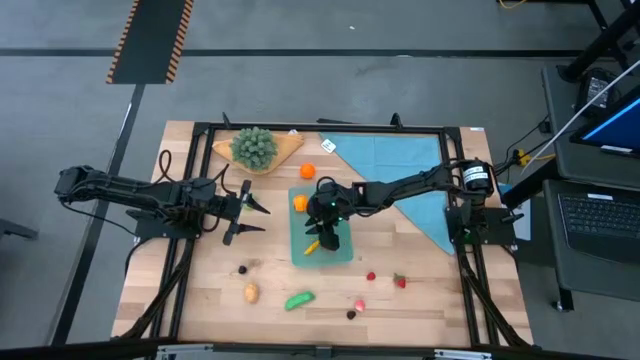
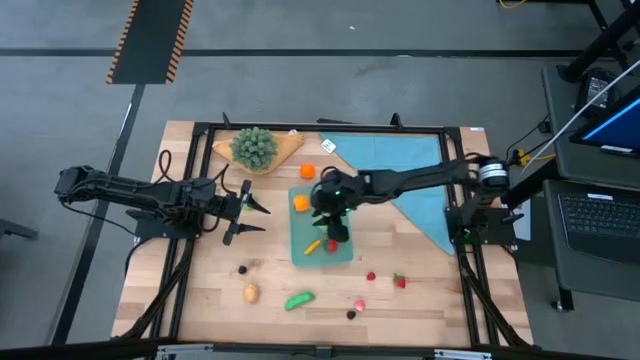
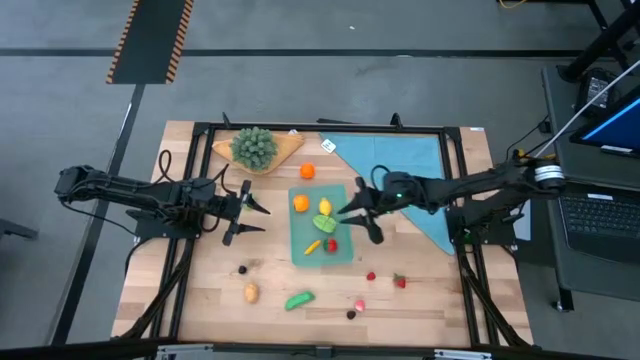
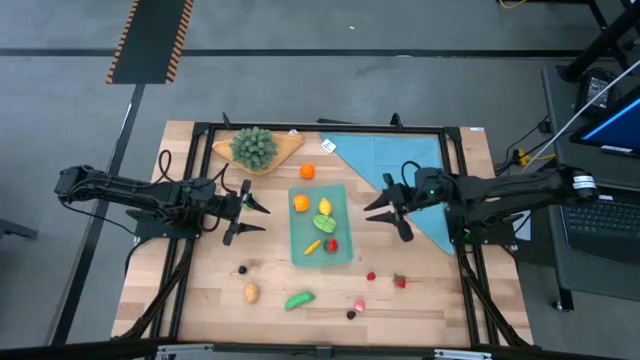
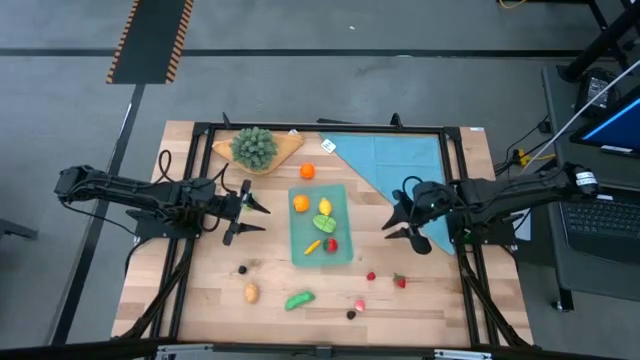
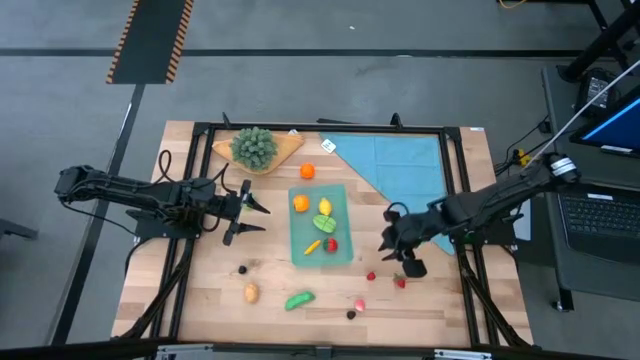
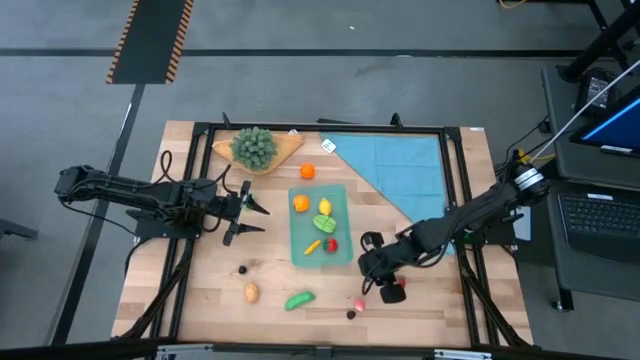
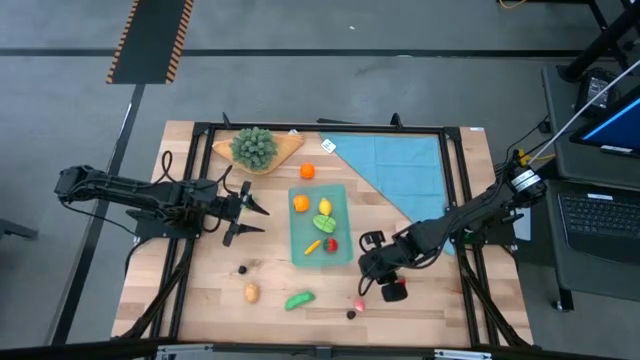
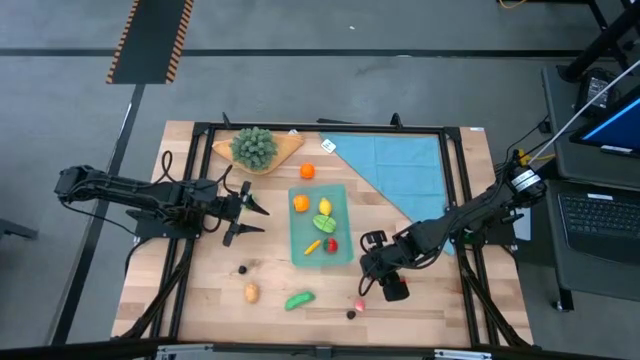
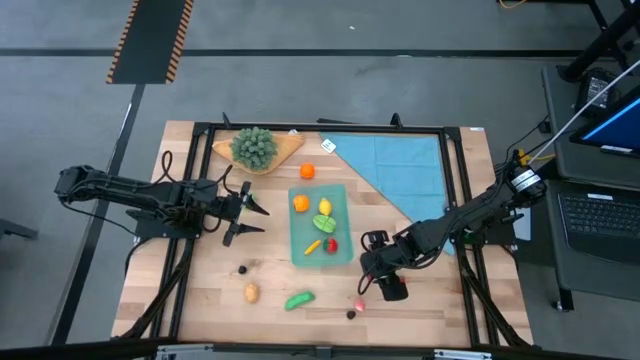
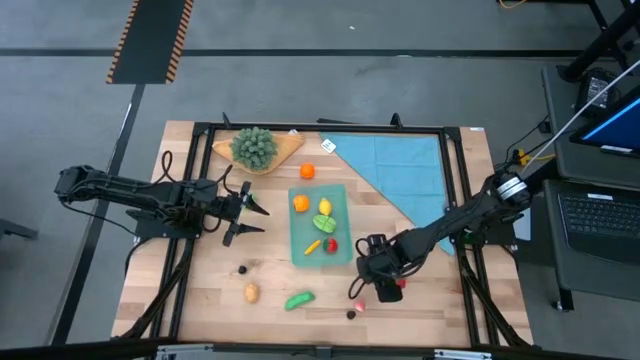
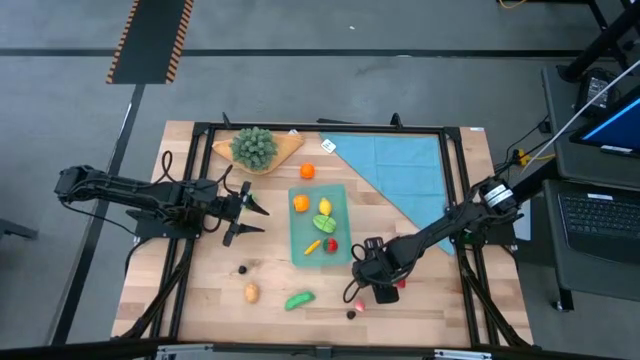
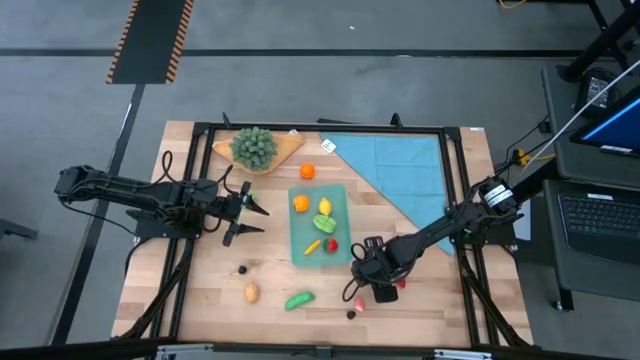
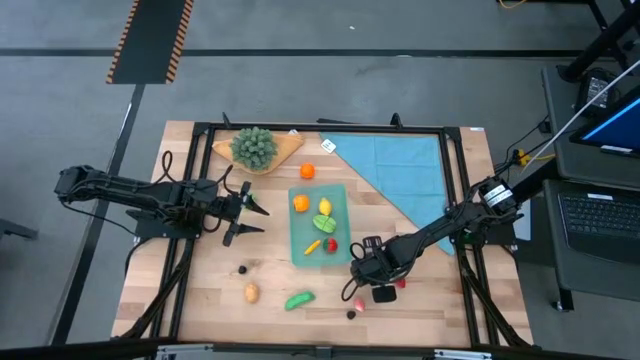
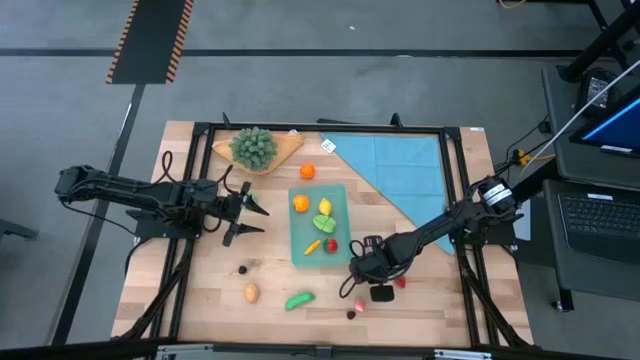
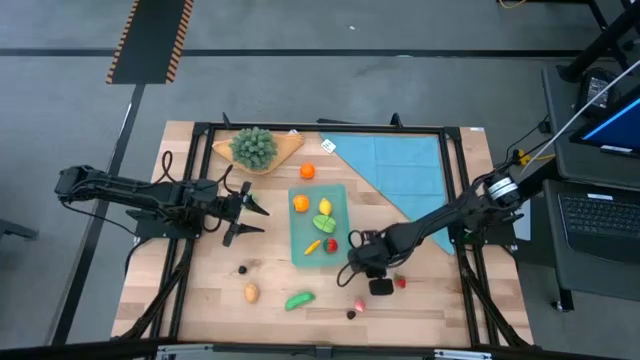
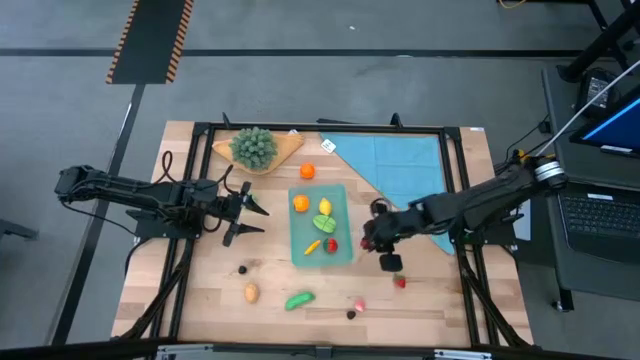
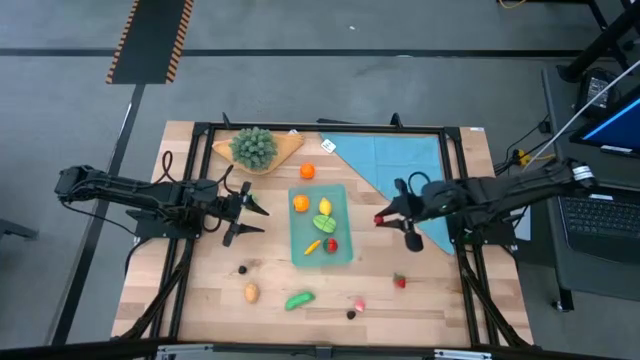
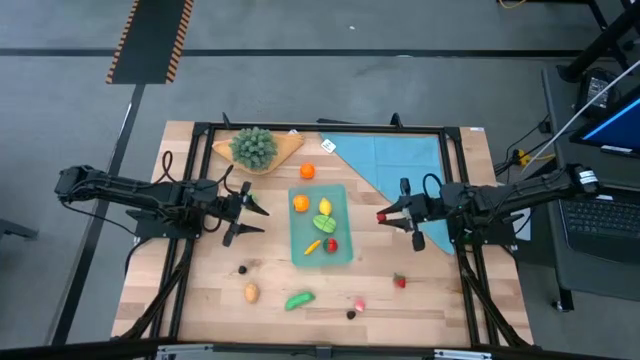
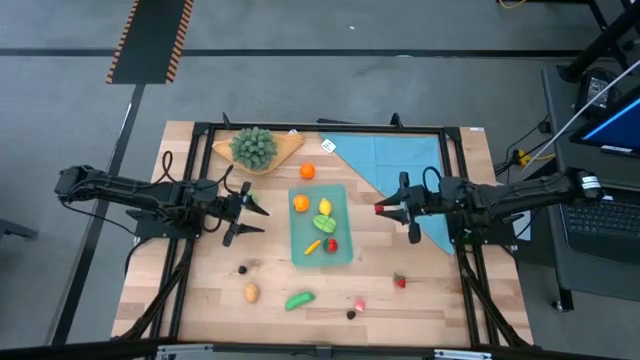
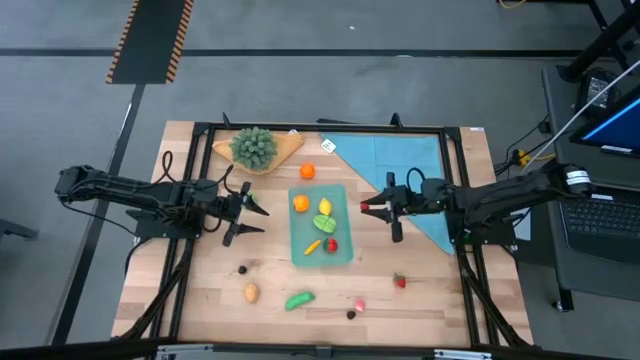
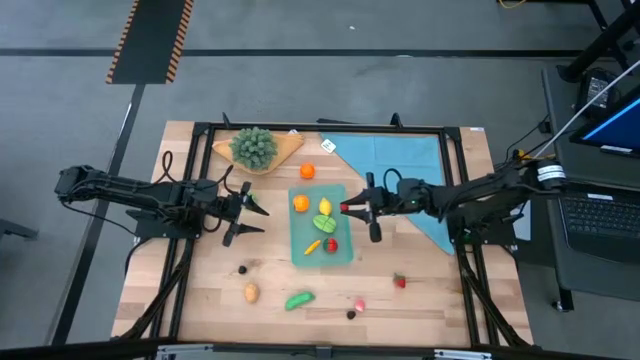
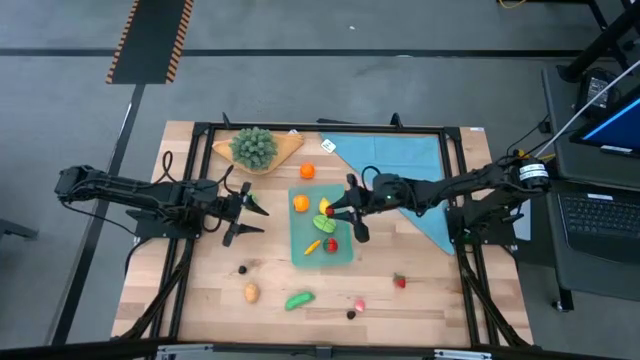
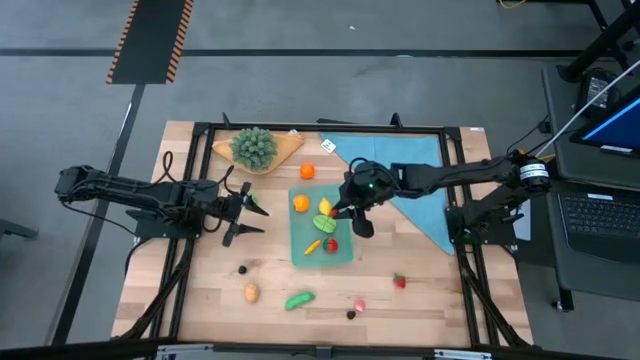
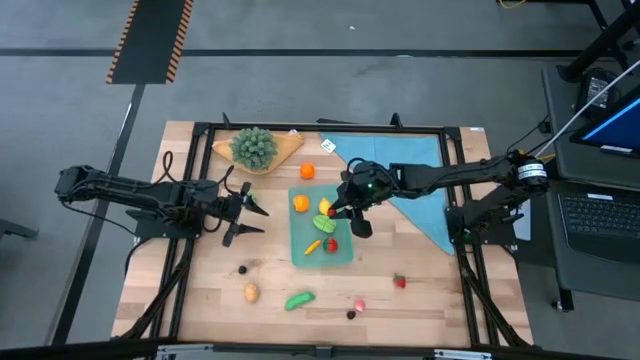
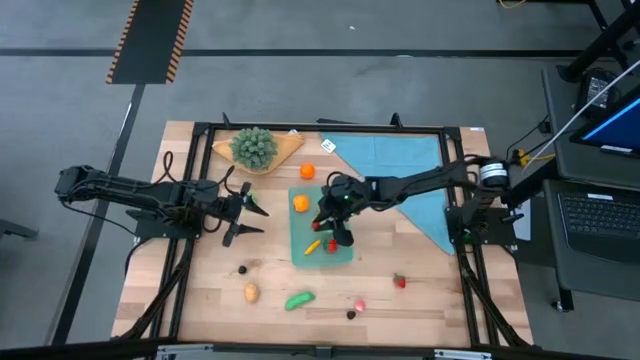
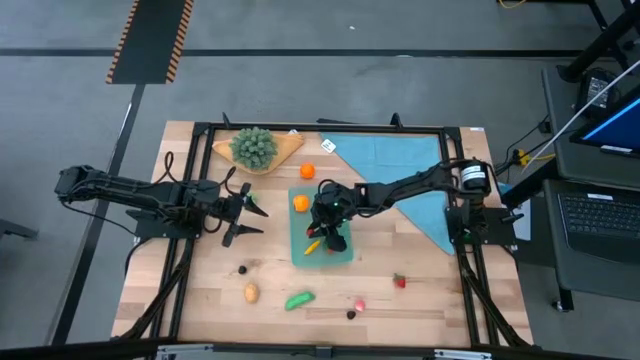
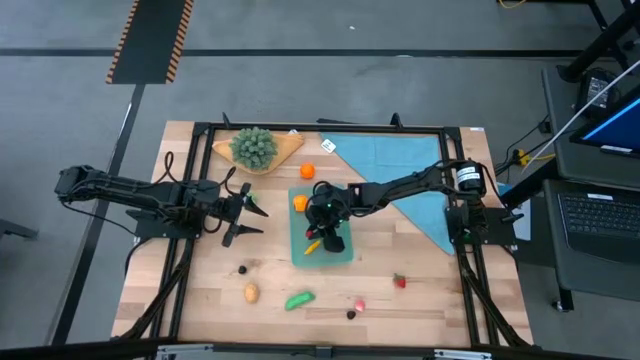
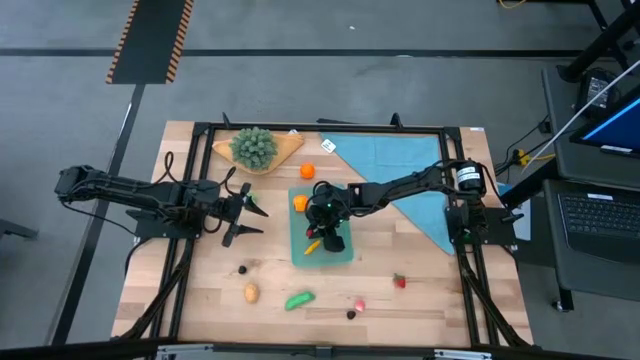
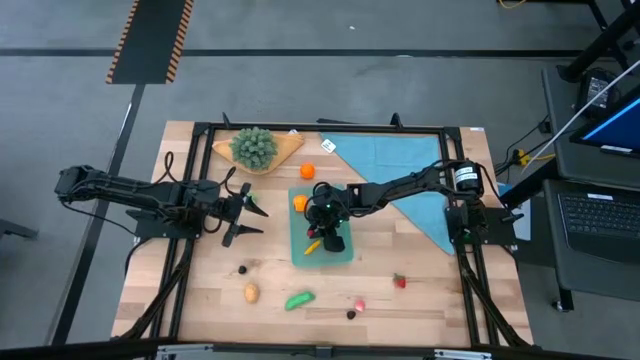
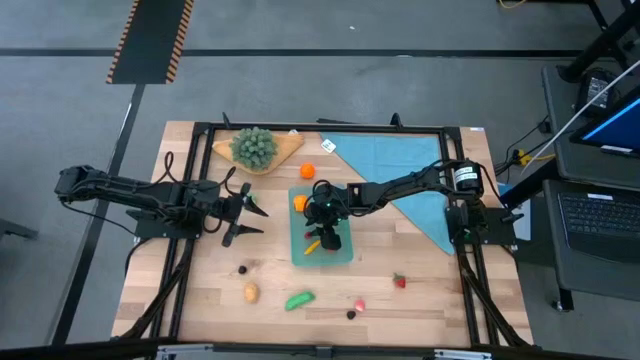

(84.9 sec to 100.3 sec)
Task: Pick and placing Produce into tupperware
Put the raspberry into the bin

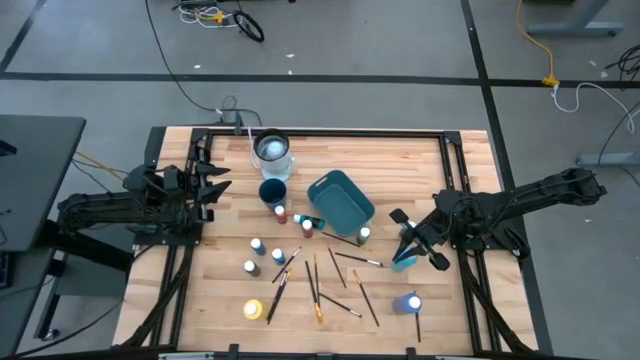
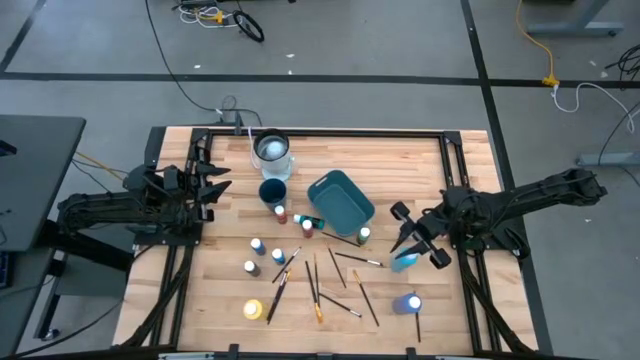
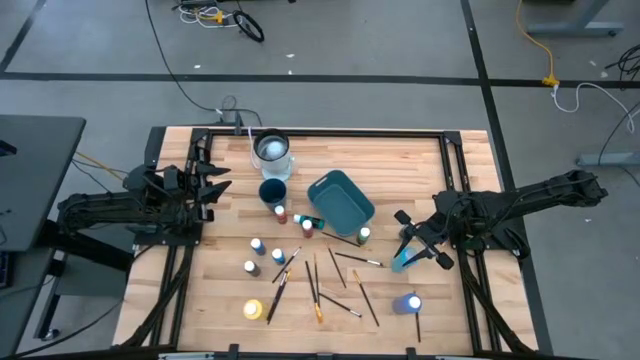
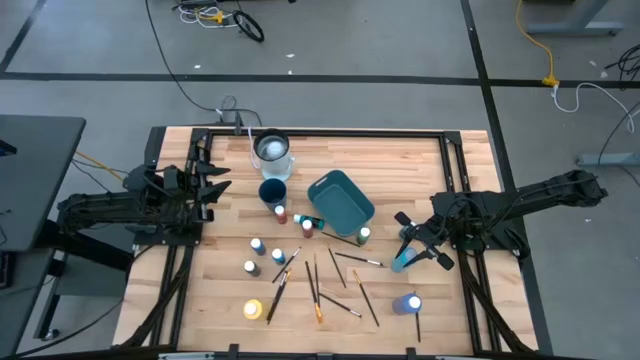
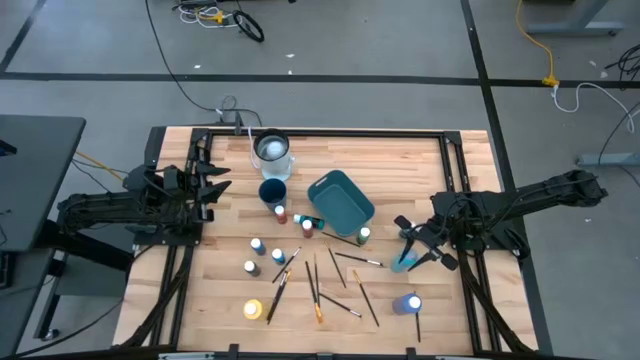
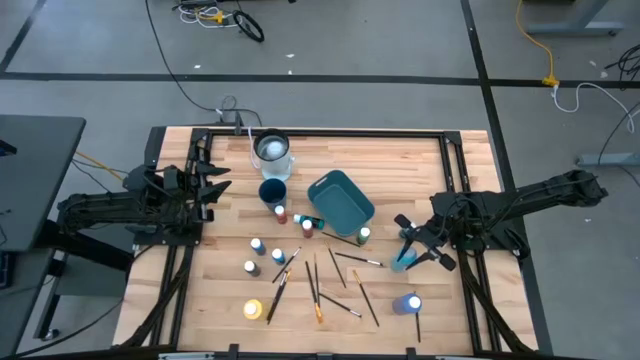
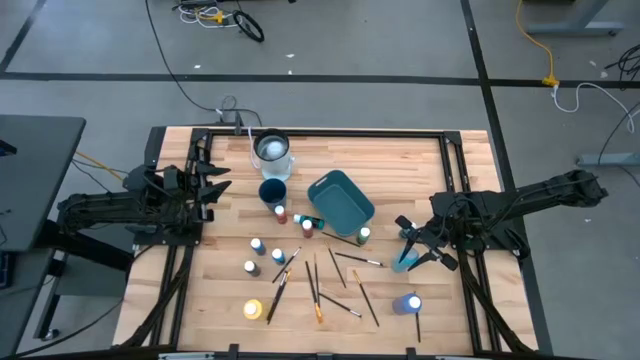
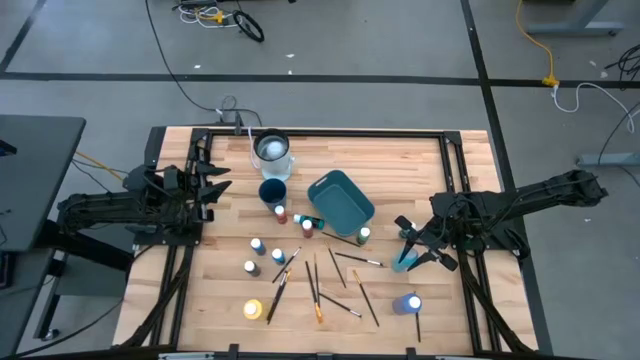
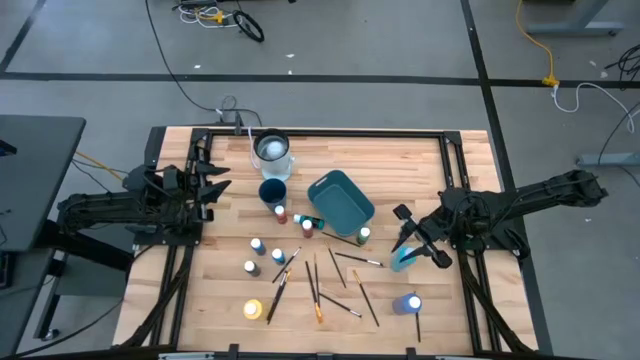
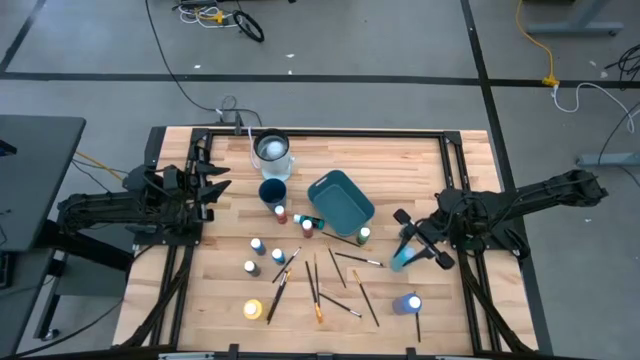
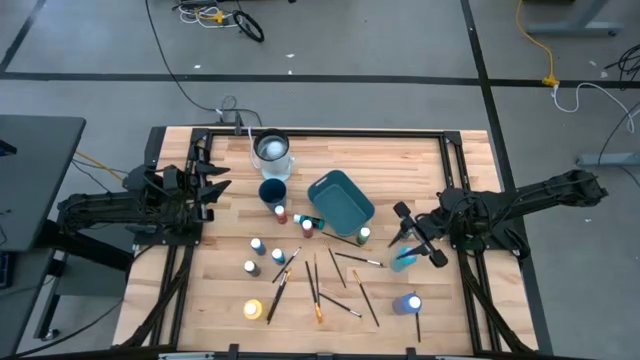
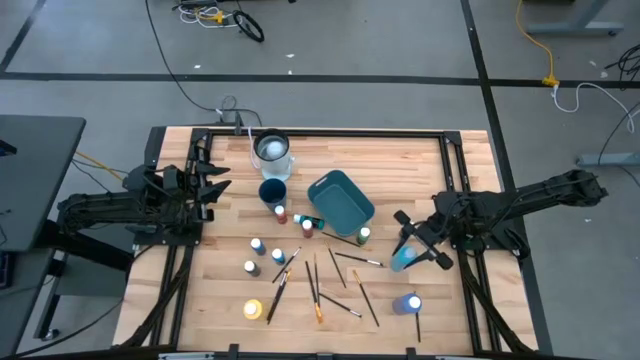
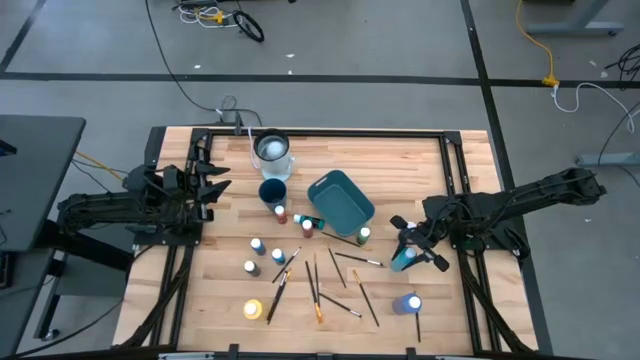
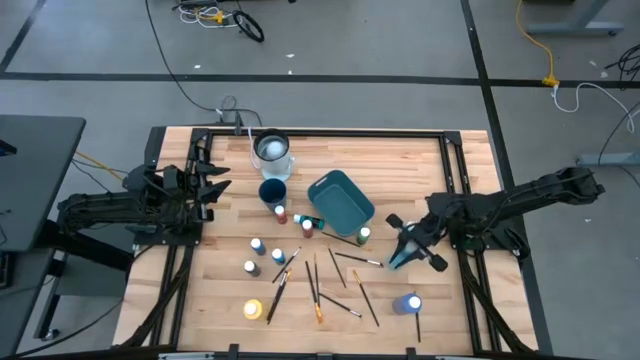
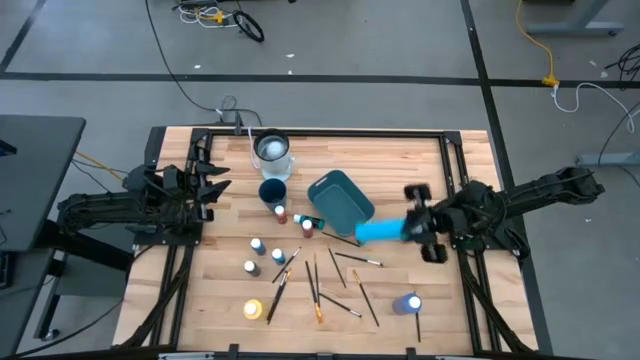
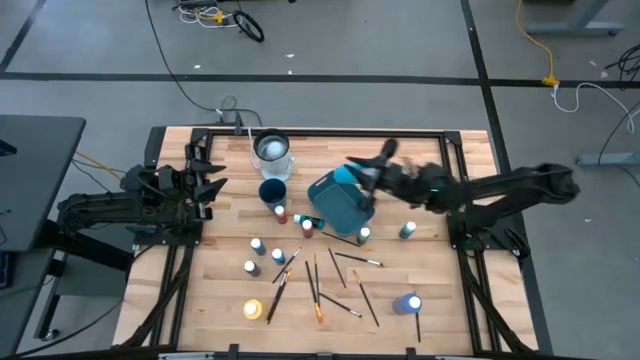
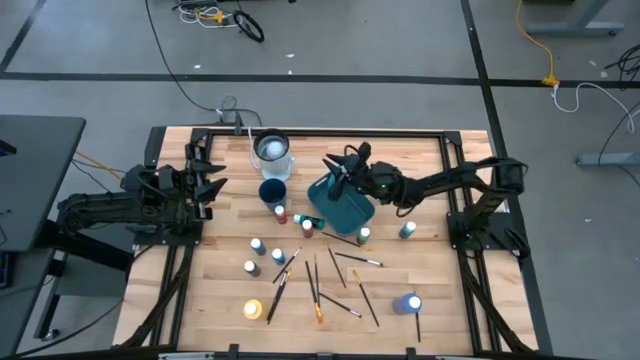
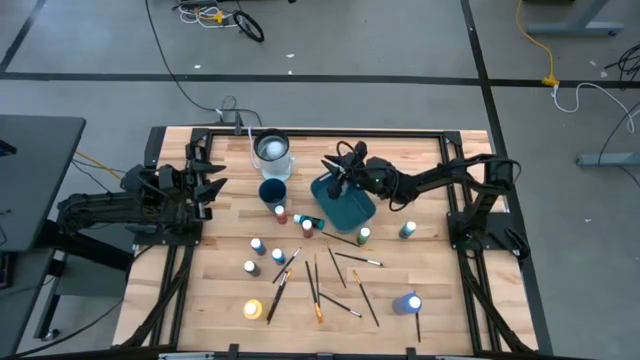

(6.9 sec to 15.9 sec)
Task: Pick & Place Paint Supplies
Put the large light blue paint bottle into the blue bin
